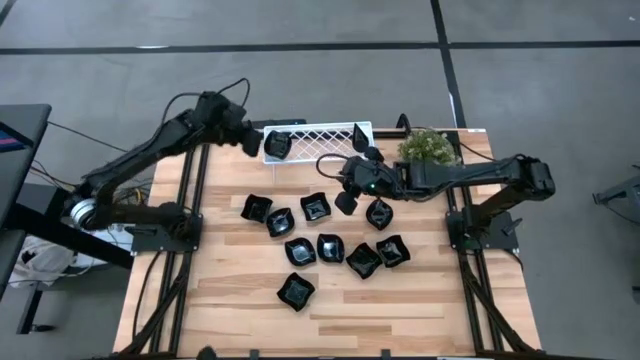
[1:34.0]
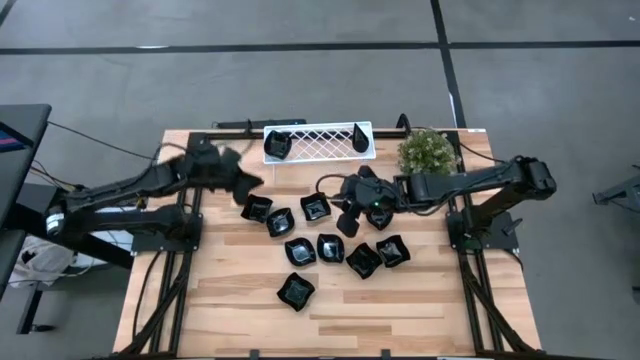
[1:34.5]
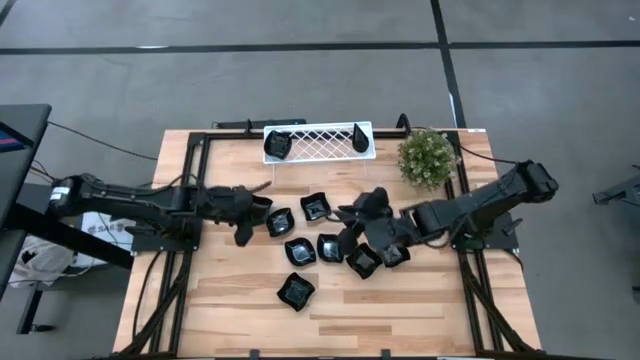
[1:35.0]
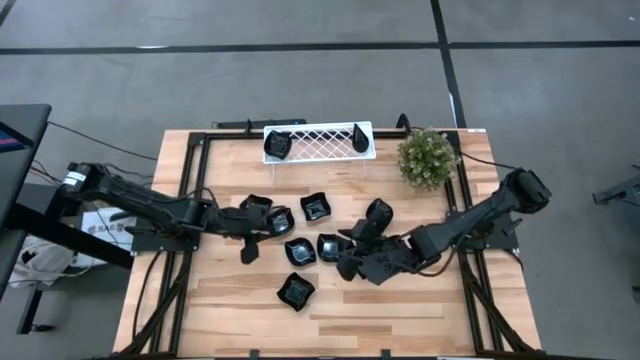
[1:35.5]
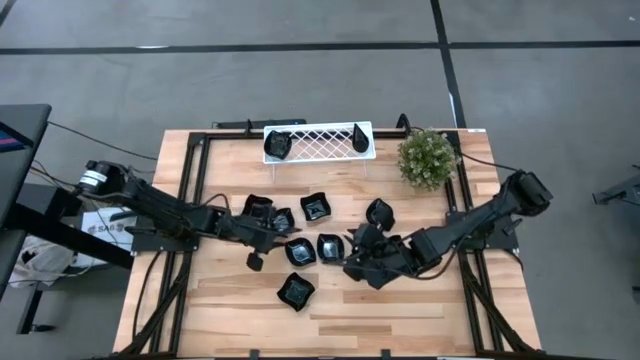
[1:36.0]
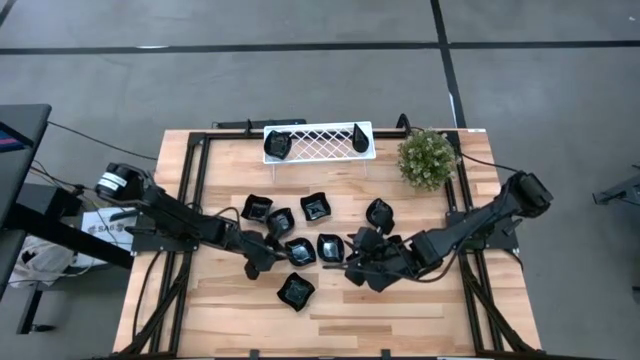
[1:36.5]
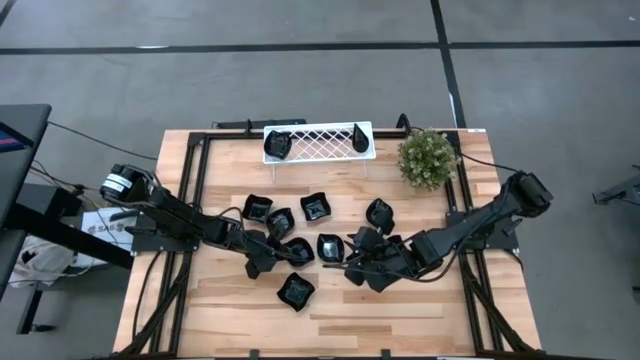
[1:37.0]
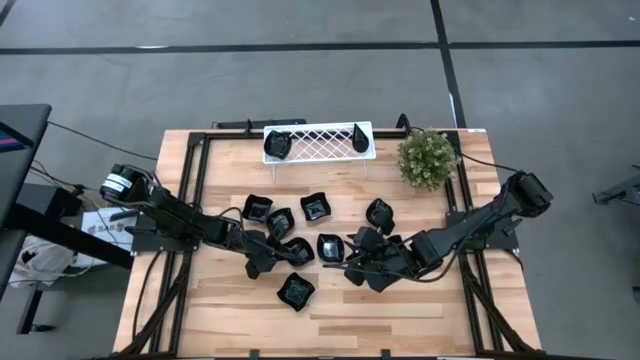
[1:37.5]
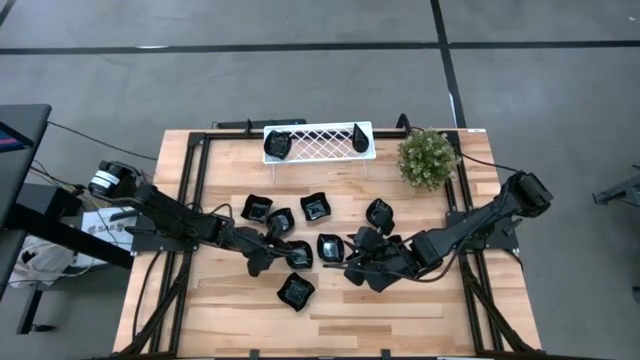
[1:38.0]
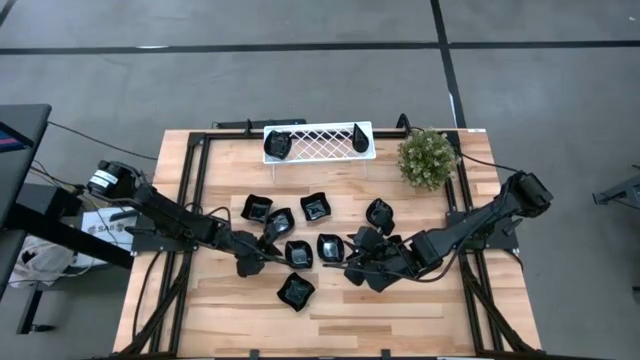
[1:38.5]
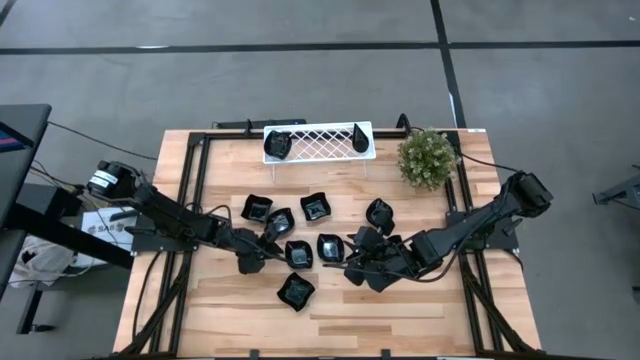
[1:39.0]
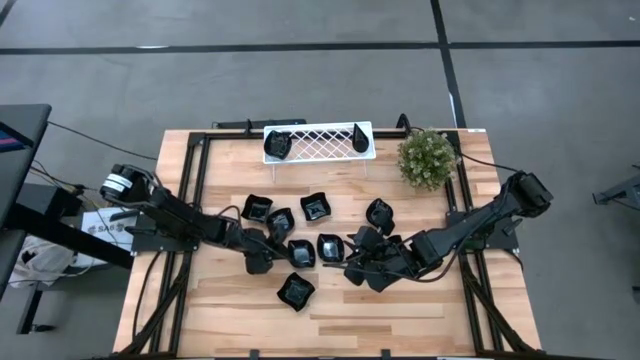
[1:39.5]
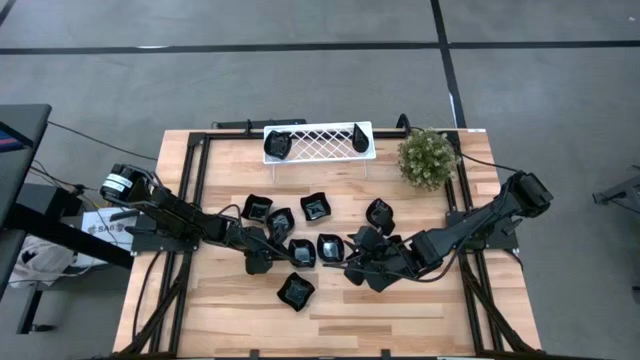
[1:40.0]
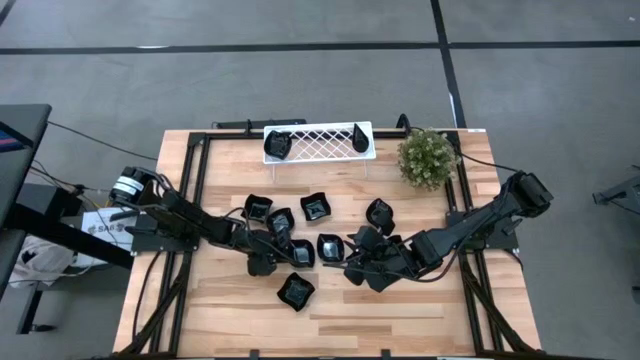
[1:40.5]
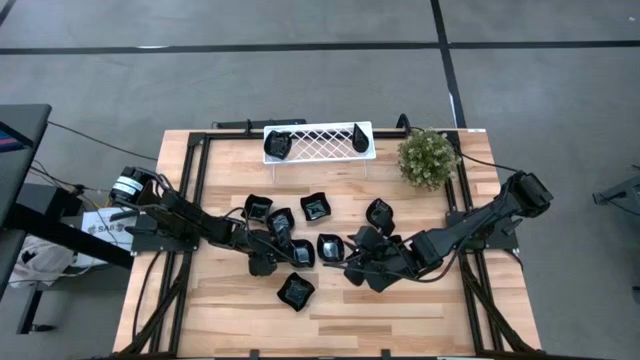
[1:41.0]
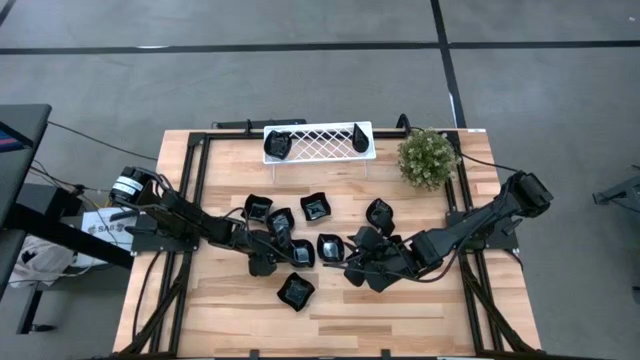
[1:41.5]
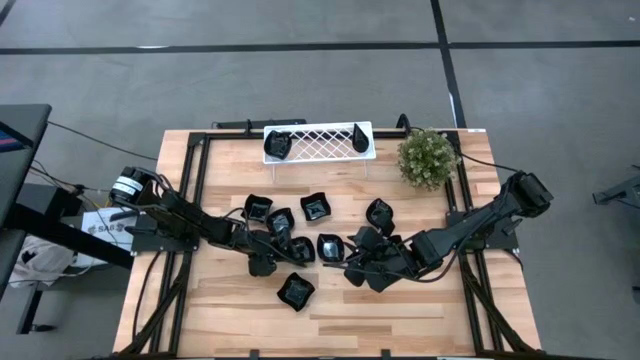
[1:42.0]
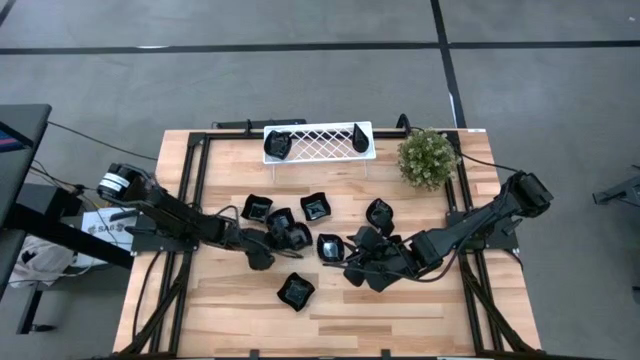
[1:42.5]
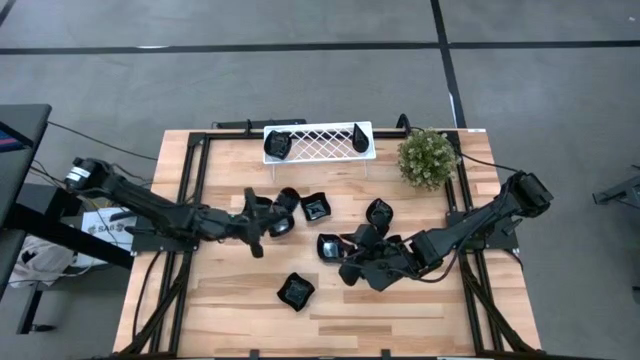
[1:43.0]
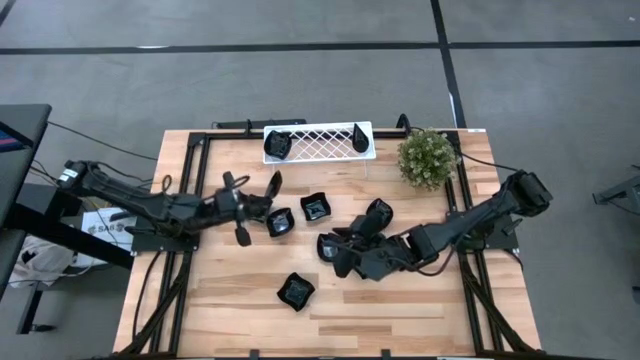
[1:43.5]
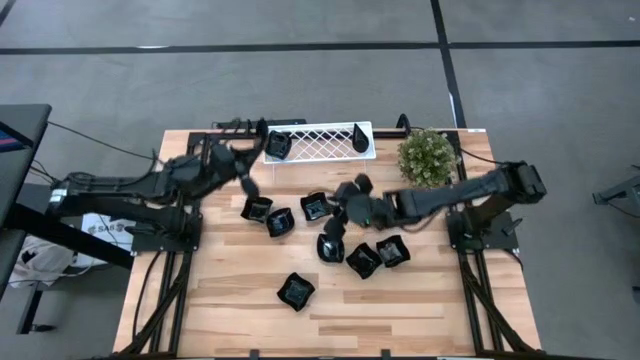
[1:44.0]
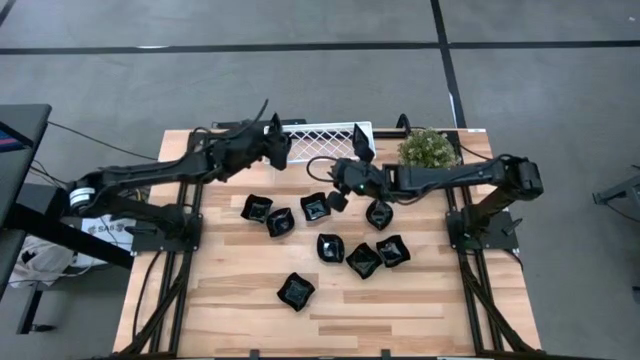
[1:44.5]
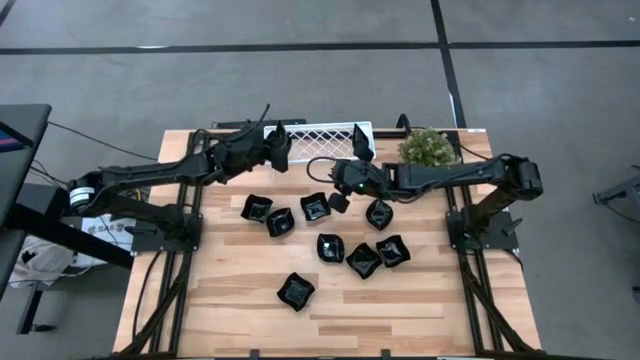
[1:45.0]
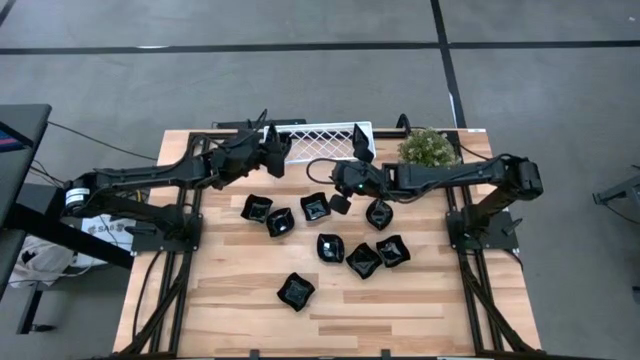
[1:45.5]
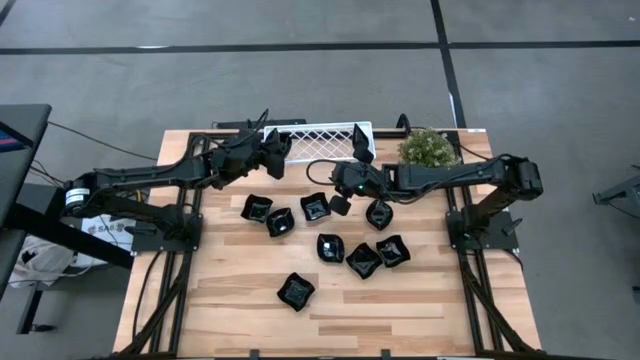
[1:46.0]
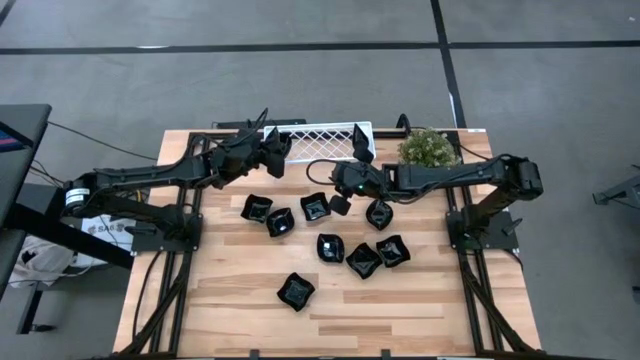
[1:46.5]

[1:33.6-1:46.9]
Task: Pick & Place Mini shaped plates
Stack the black leaf shaped plate on top of the black leaf shaped plate on the shelf

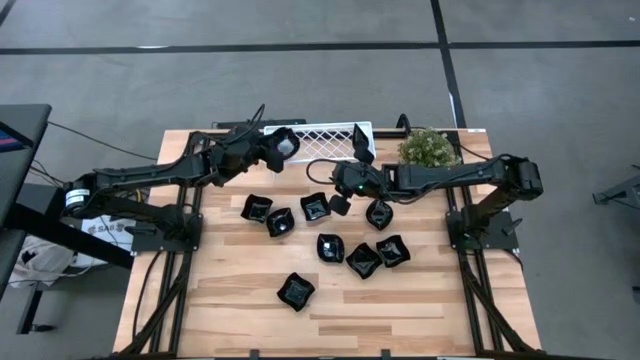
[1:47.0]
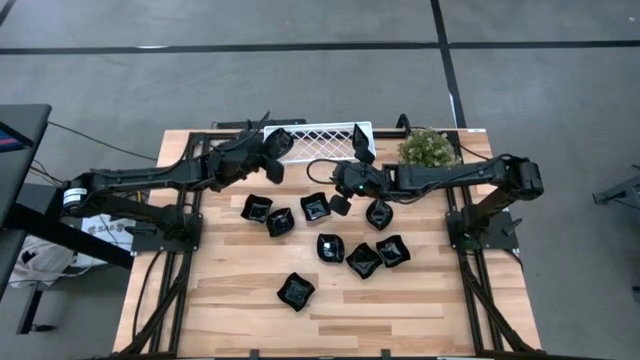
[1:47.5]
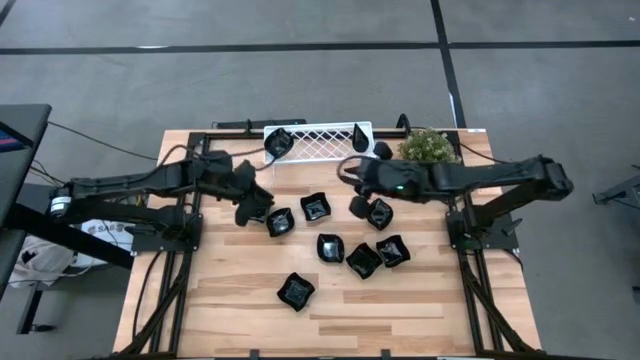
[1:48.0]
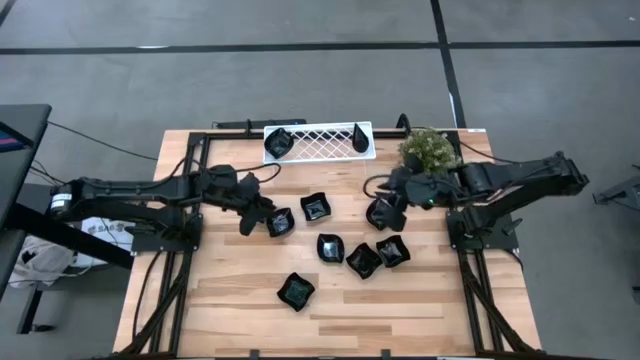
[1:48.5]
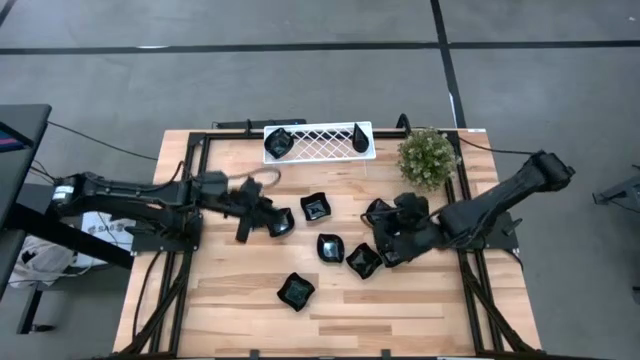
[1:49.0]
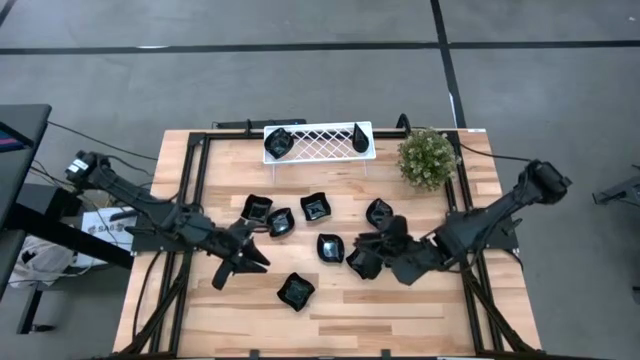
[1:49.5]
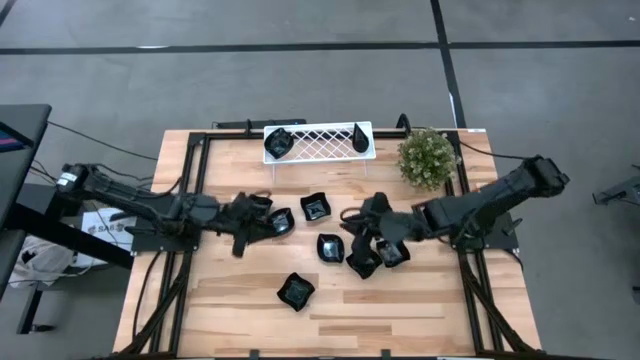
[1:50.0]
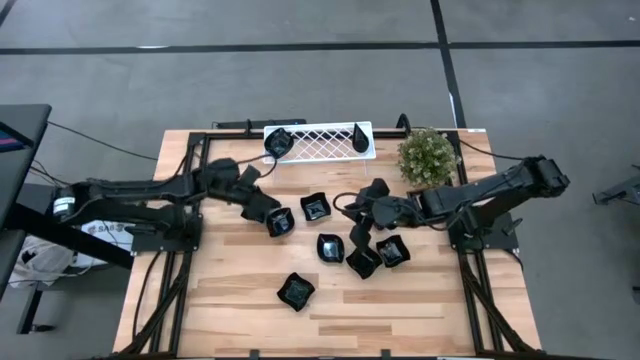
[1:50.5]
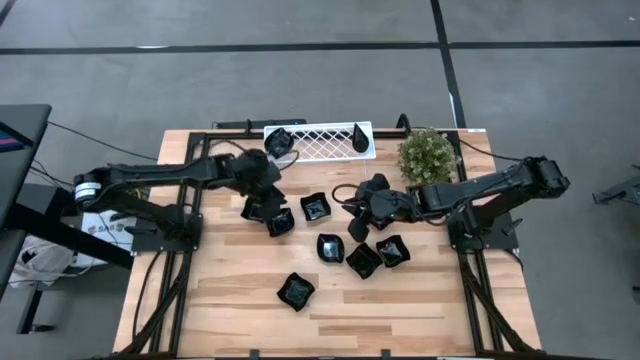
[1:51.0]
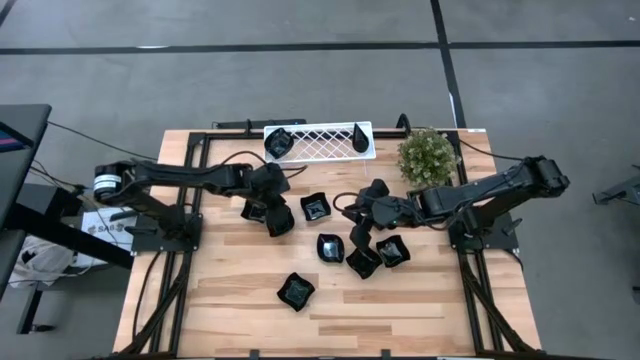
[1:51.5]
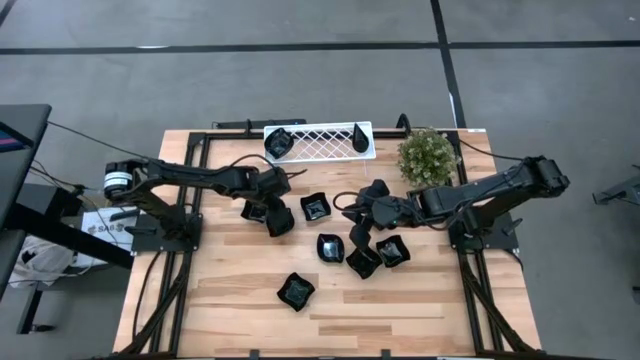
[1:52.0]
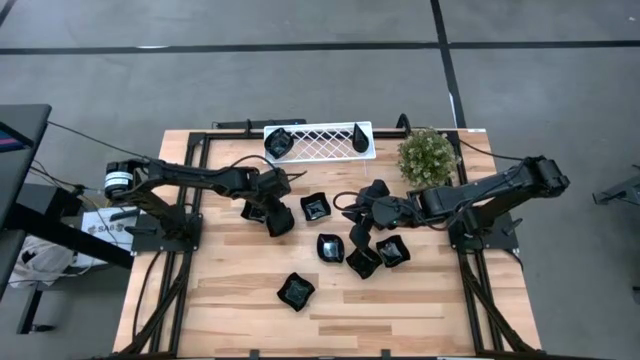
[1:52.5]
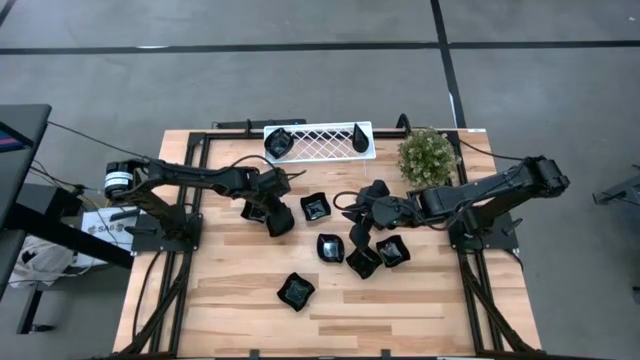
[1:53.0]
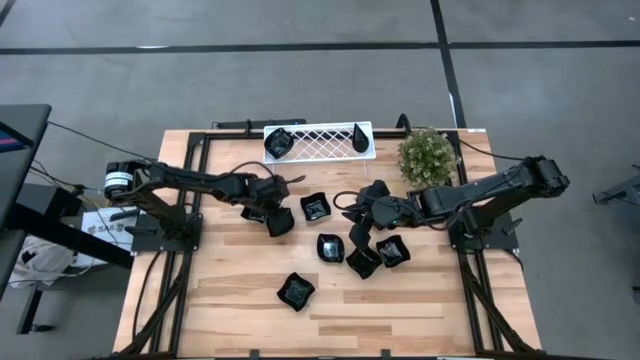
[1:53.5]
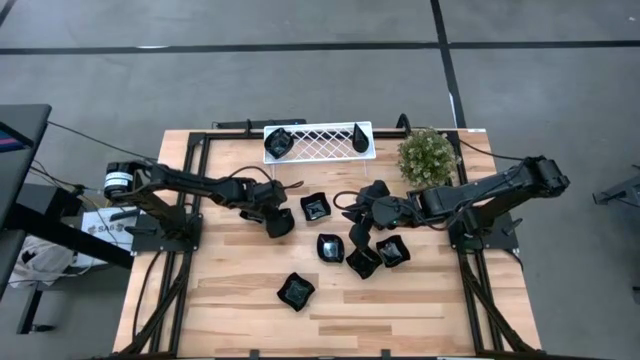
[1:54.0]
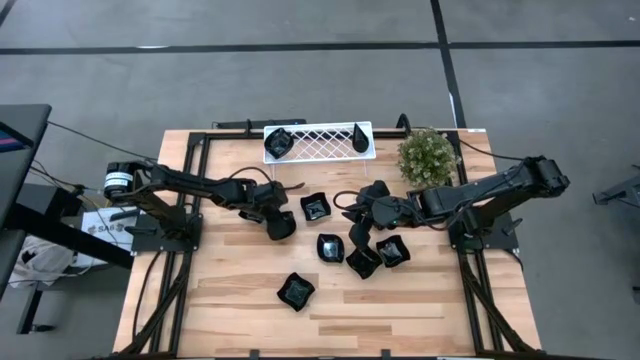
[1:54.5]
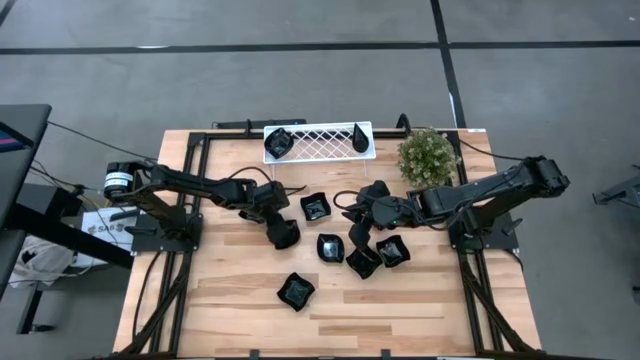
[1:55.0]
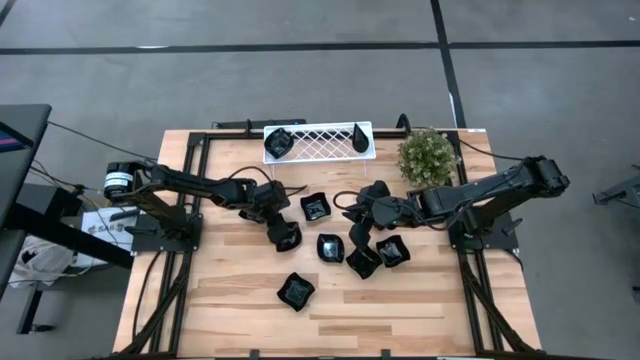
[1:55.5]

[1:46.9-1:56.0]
Stack the black leaf shaped plate on top of the black leaf shaped plate on the shelf
